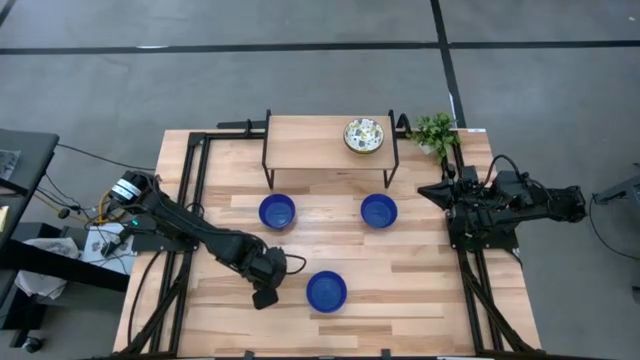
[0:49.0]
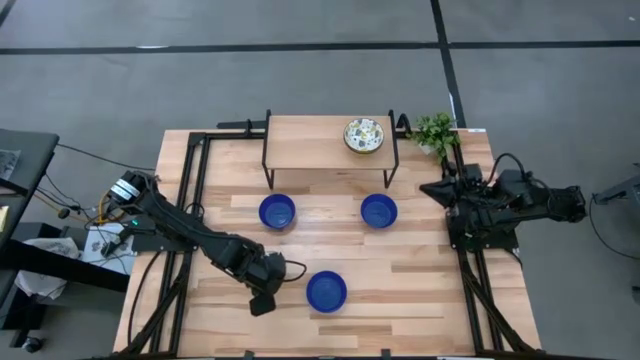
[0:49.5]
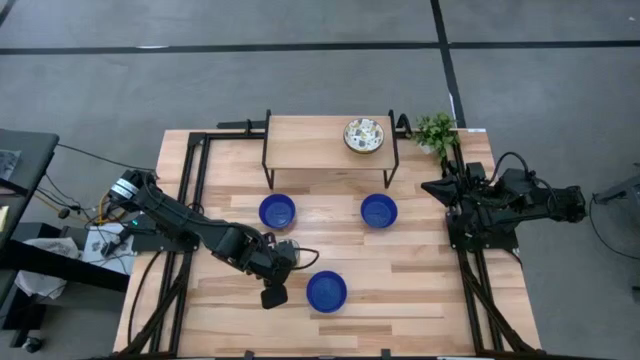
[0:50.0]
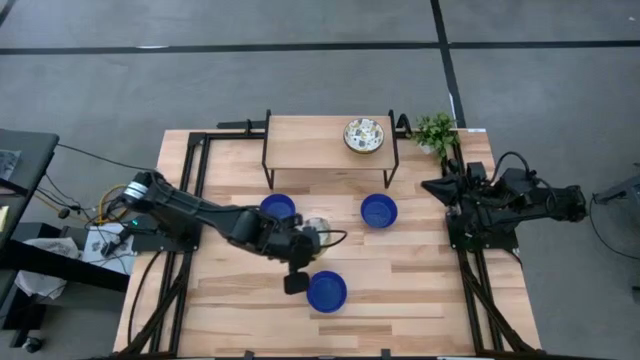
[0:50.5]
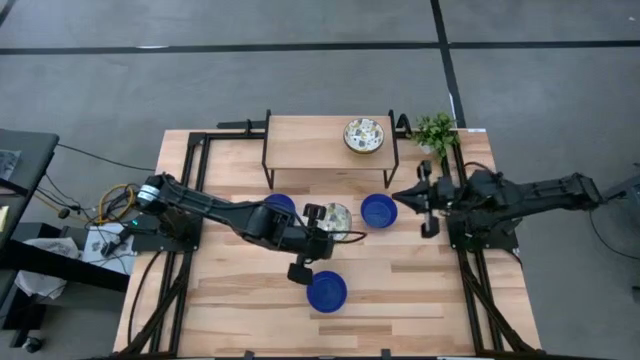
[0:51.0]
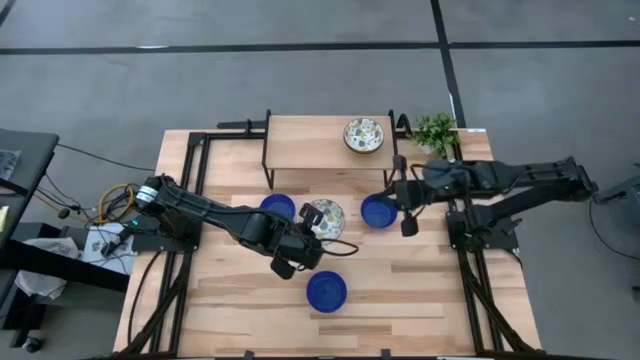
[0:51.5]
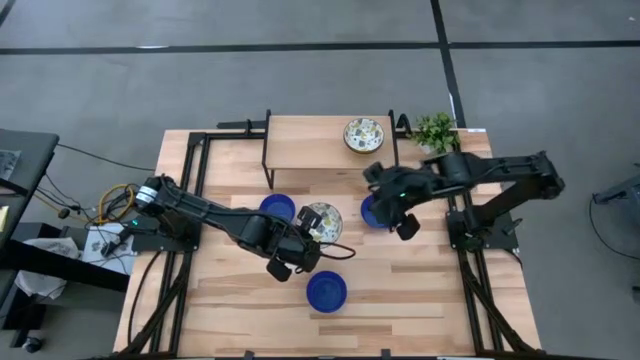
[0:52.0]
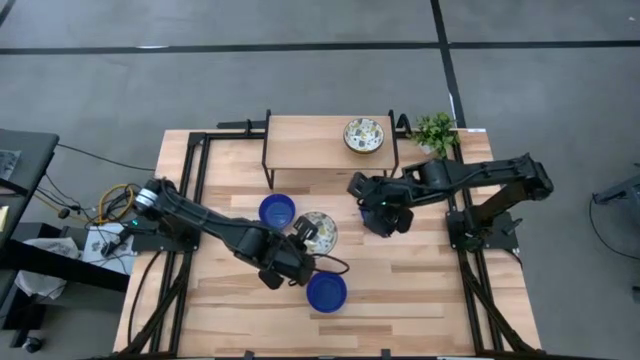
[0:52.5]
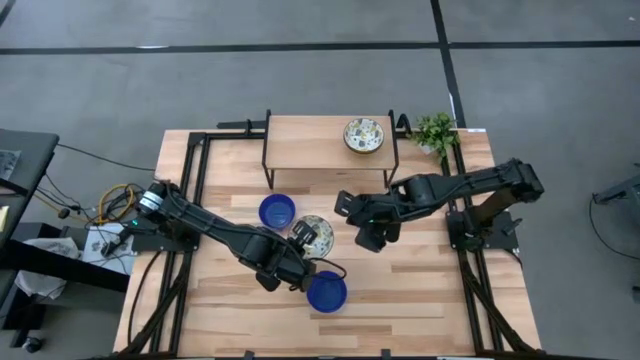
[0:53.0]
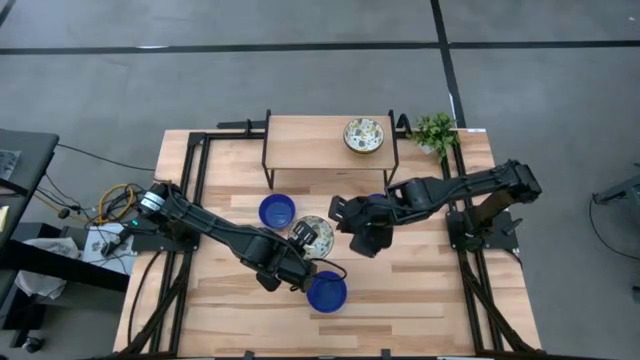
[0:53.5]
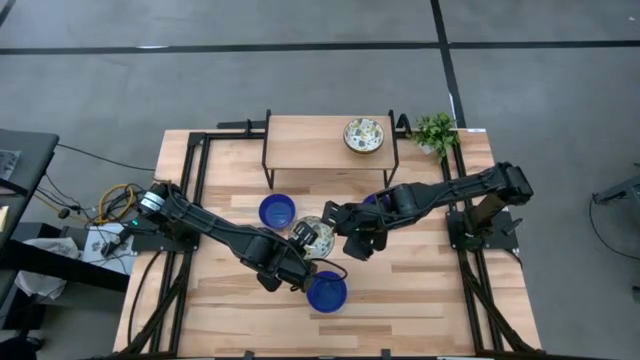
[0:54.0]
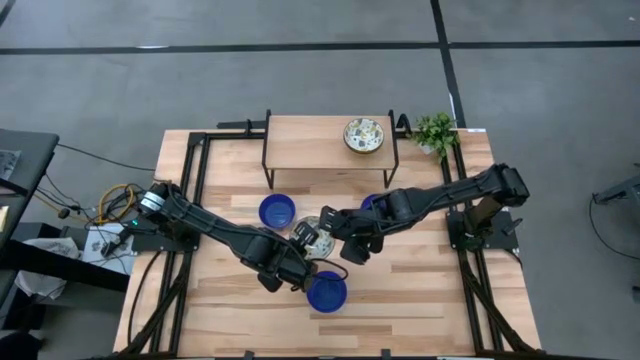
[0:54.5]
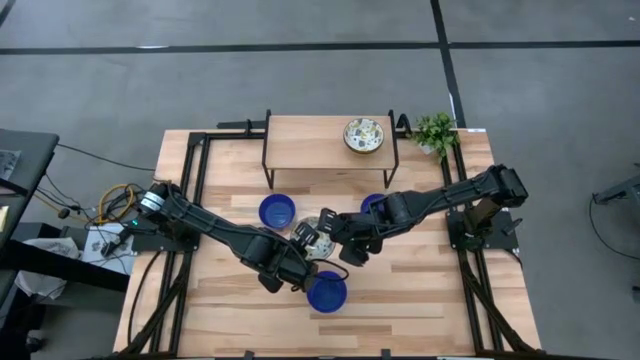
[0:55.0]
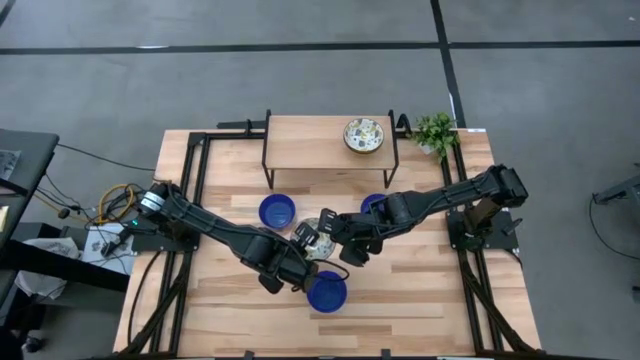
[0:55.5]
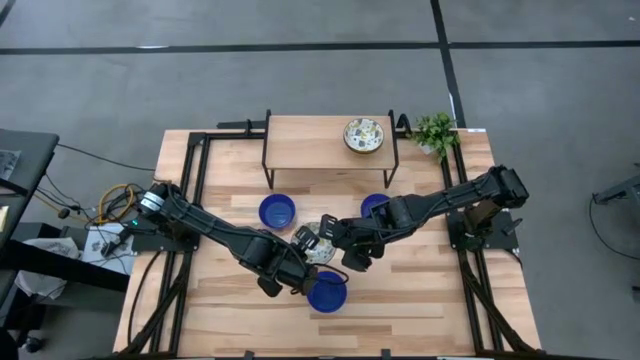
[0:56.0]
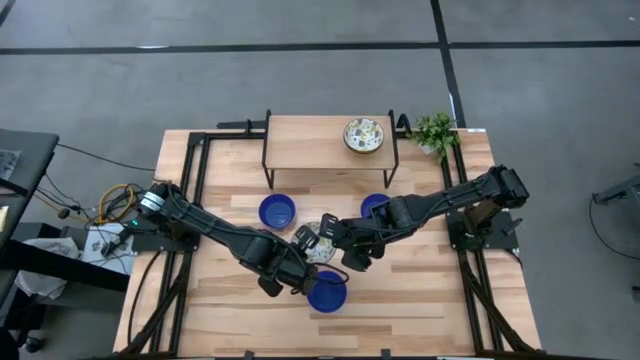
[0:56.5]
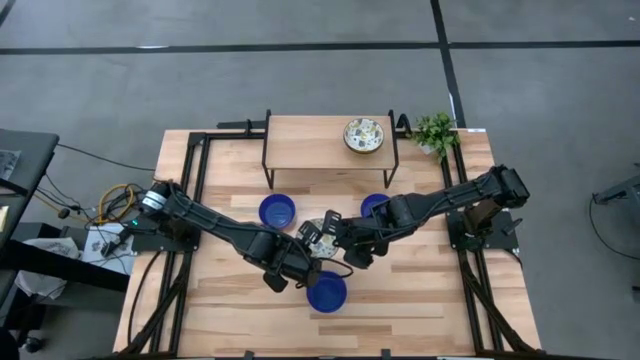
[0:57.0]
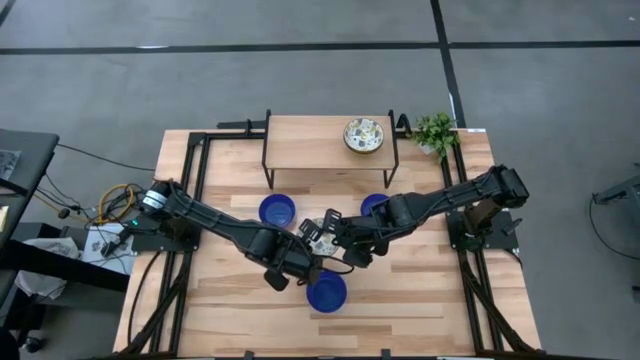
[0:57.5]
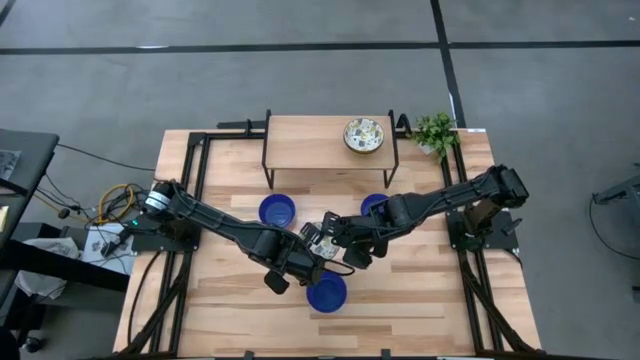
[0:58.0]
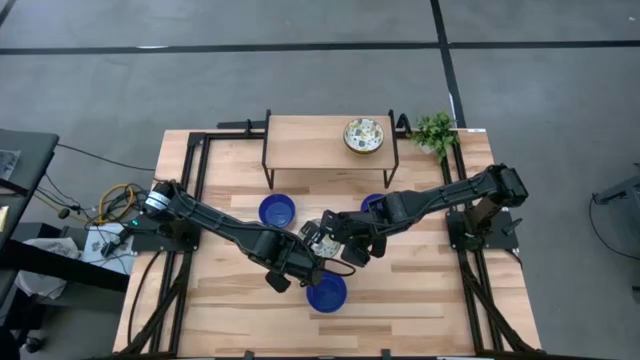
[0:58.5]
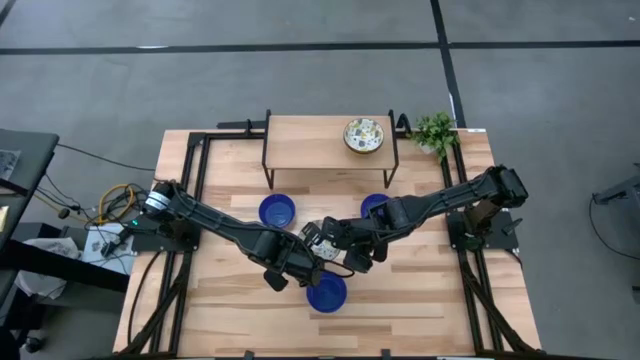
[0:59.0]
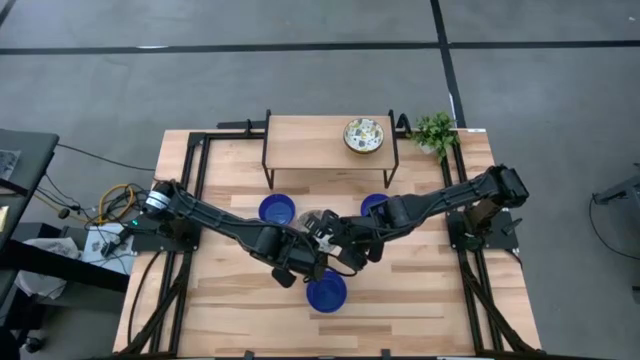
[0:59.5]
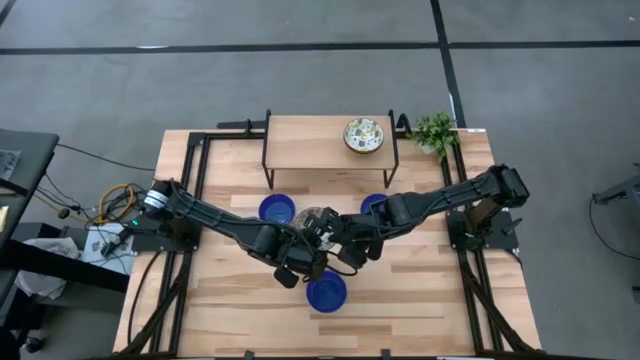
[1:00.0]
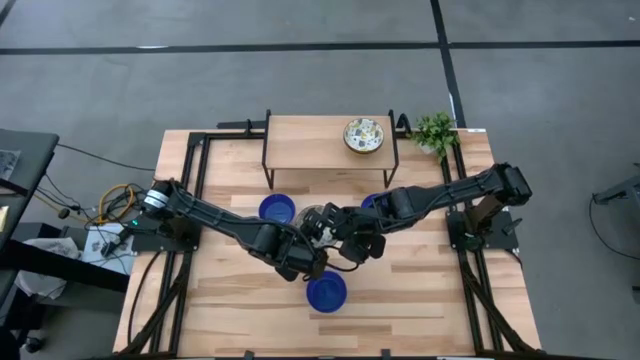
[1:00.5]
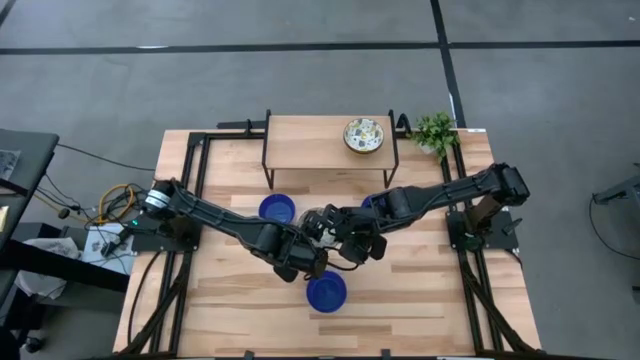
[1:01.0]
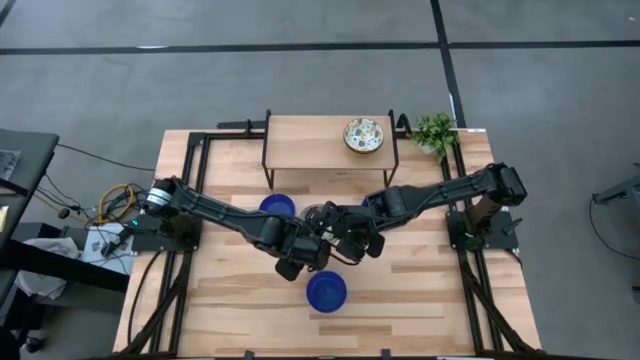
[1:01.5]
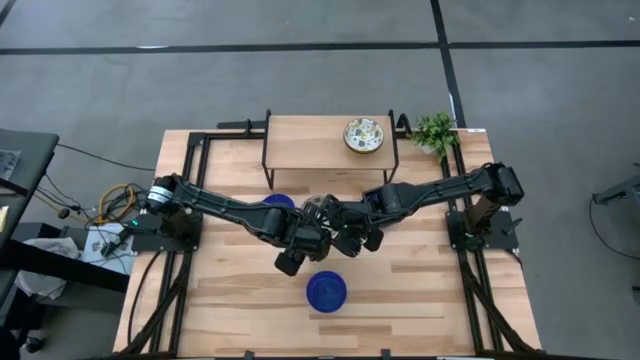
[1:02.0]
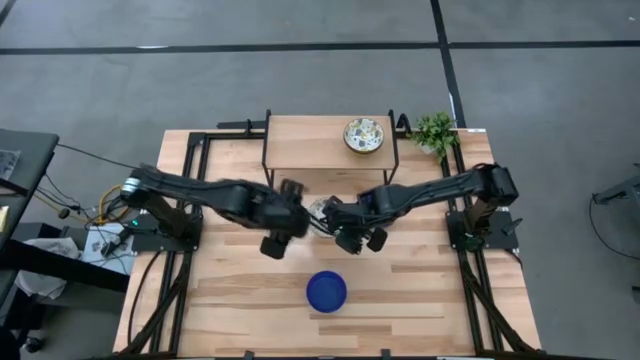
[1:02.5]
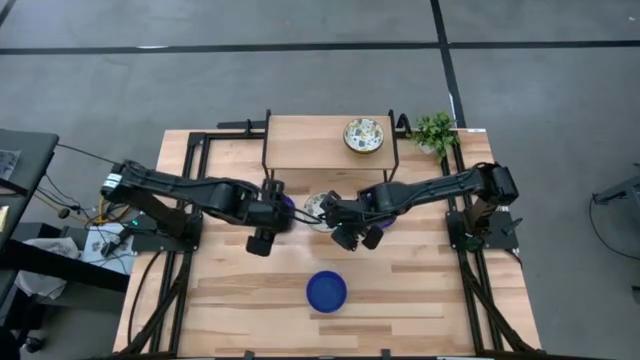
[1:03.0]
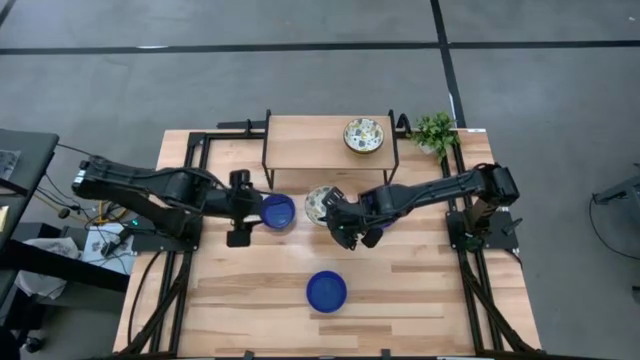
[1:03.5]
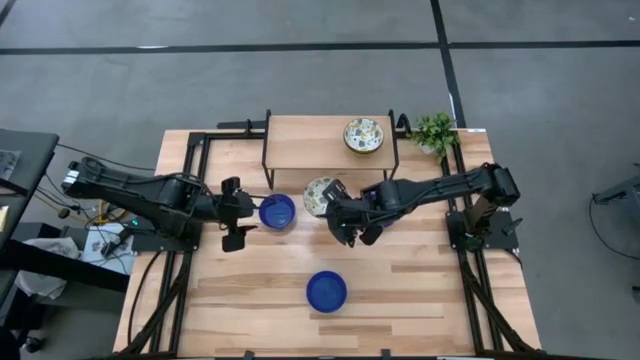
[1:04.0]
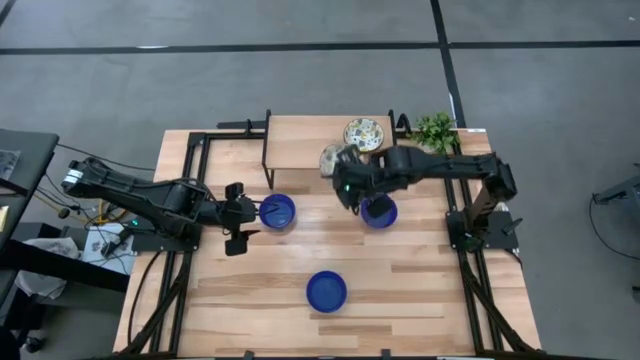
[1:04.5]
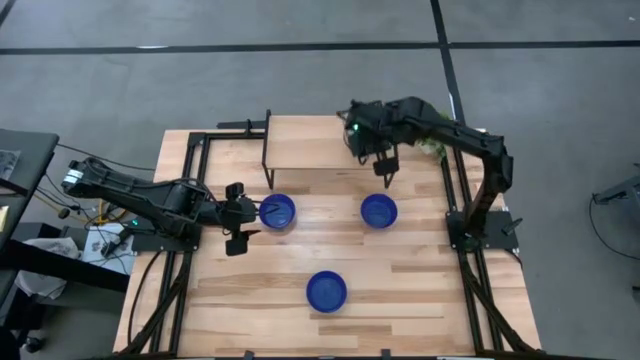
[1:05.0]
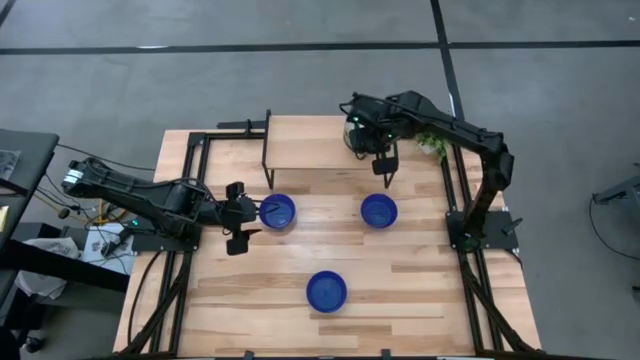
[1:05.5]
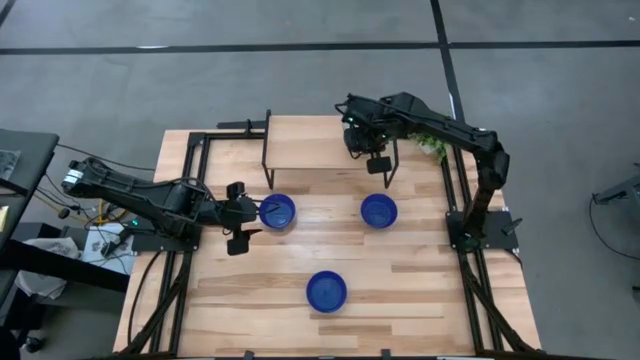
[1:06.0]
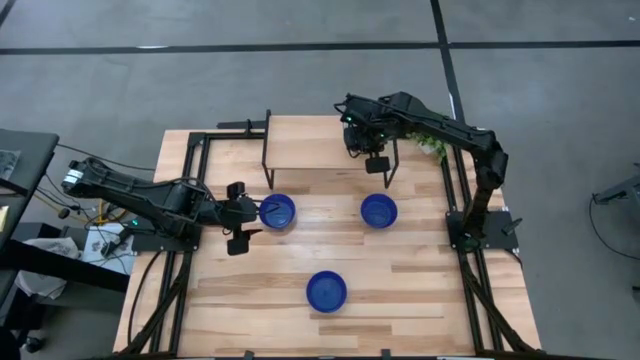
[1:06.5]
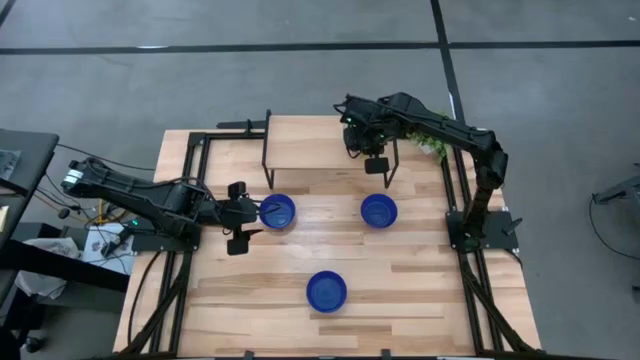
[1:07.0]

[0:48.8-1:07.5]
Task: Pick & Place Mini bowls
Stack the white patterned bowl on top of the white bowl on the shelf

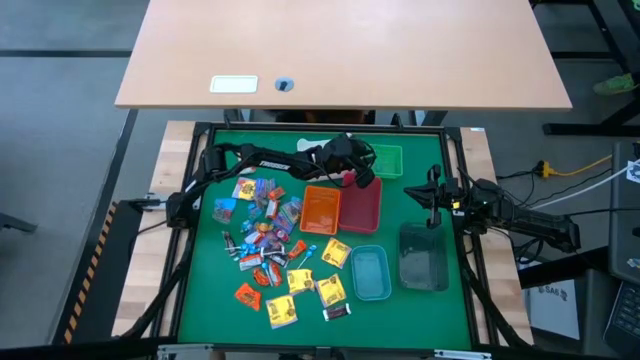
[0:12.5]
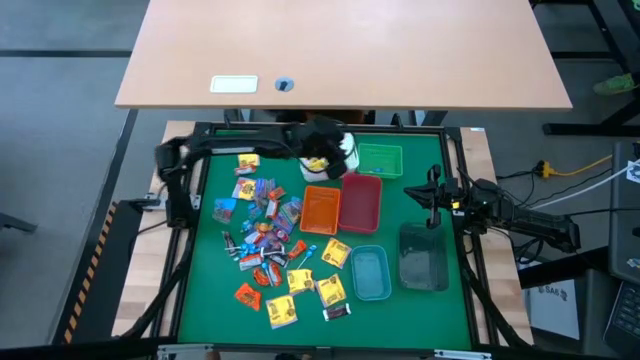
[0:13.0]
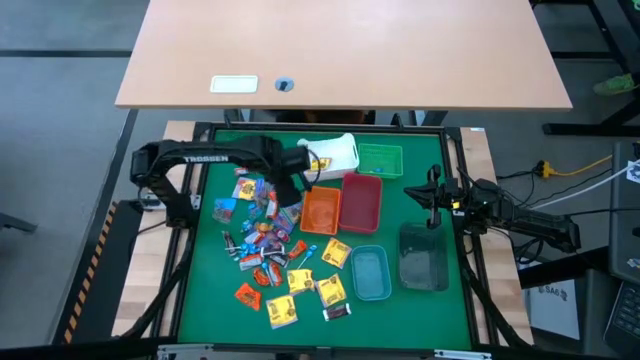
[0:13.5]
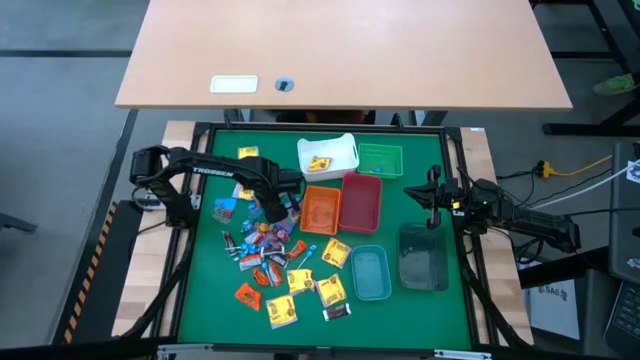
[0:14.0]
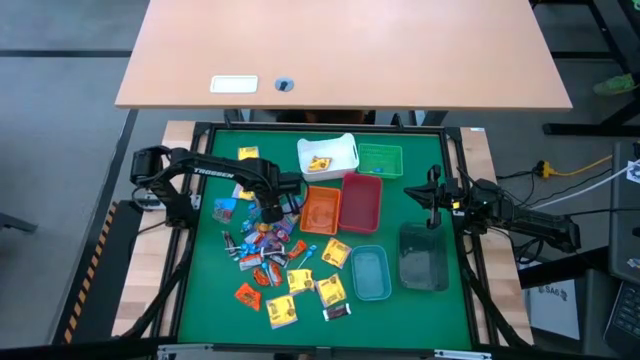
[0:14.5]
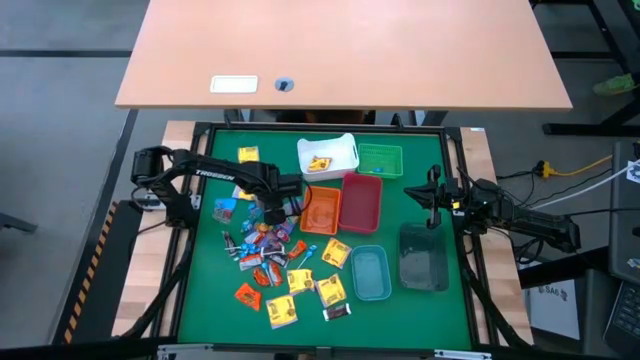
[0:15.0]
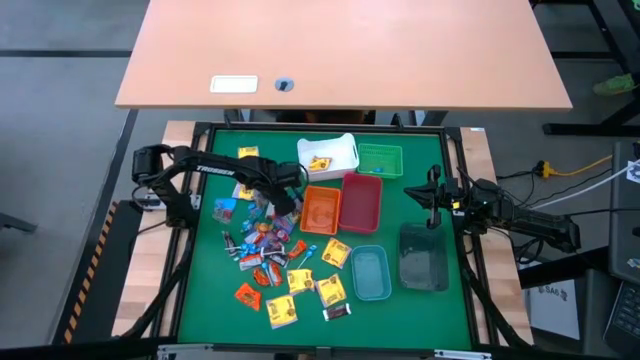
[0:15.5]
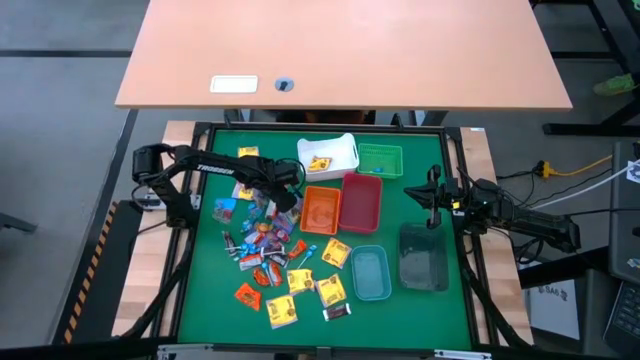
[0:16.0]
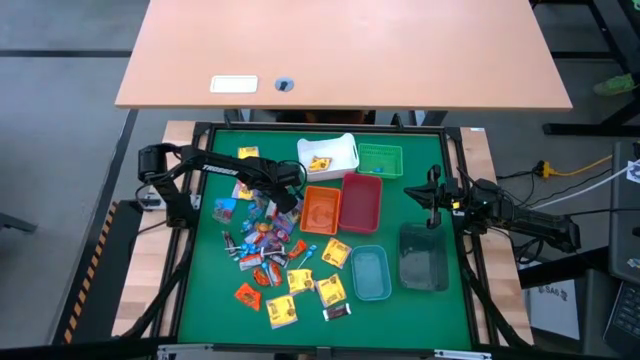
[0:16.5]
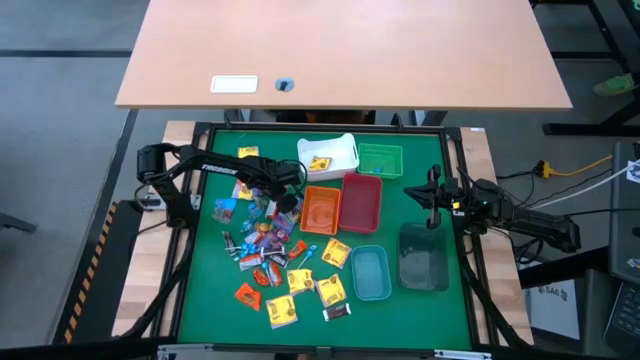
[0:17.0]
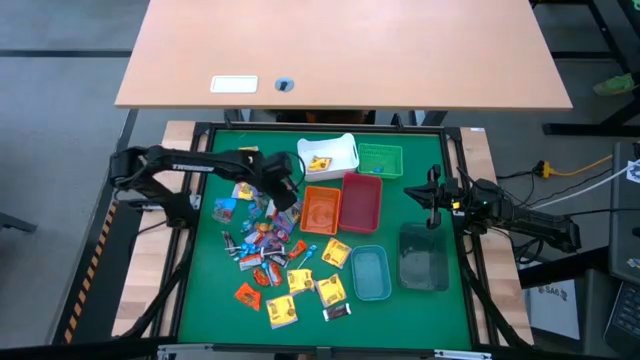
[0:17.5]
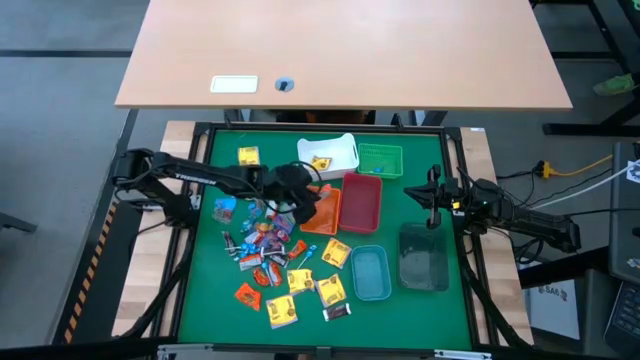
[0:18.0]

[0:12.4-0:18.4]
Task: Sort candy
Put the orange chocolate into the orange basket
